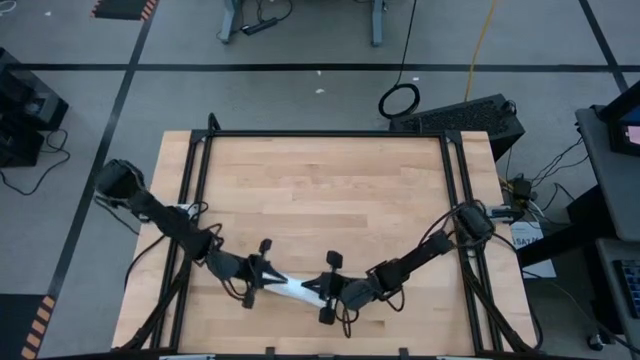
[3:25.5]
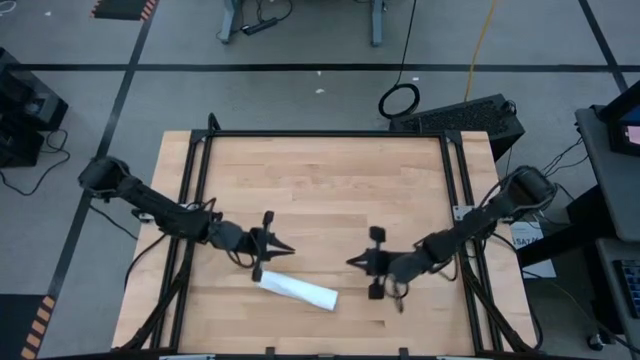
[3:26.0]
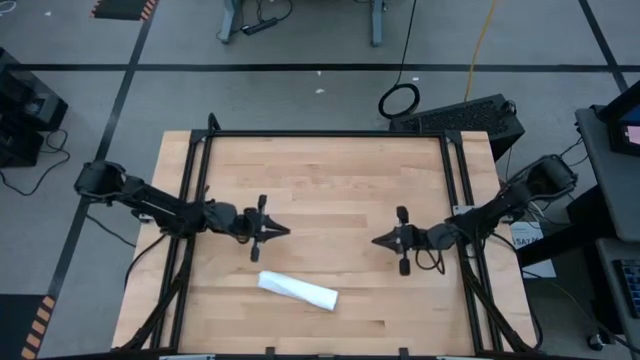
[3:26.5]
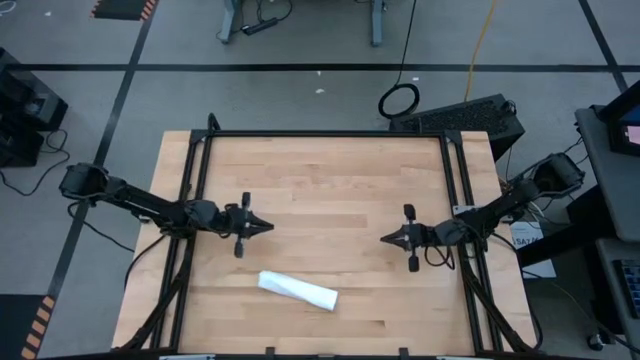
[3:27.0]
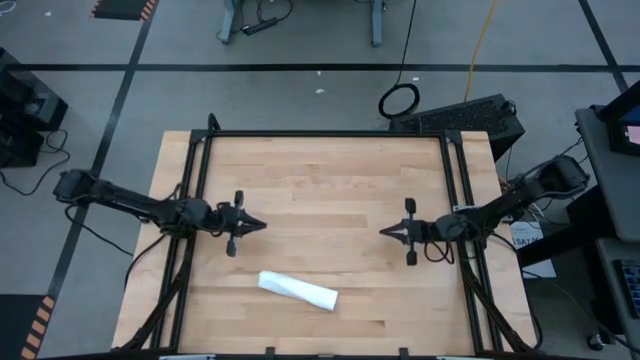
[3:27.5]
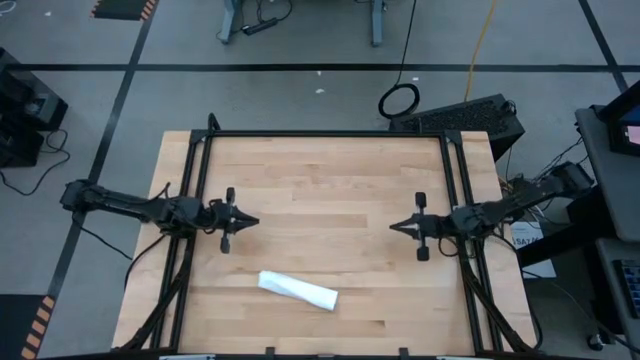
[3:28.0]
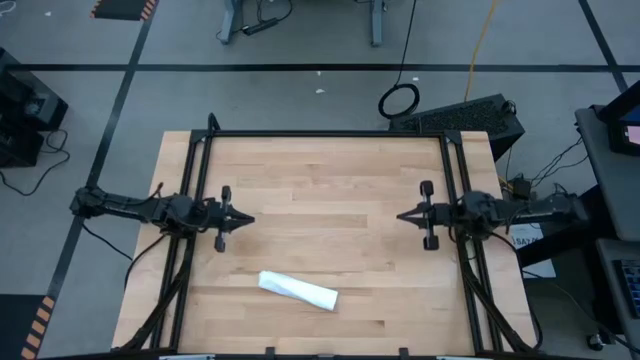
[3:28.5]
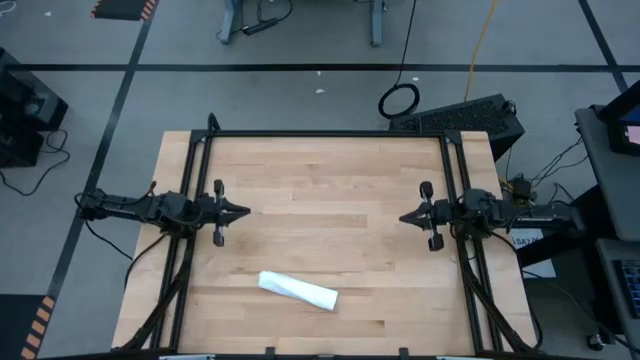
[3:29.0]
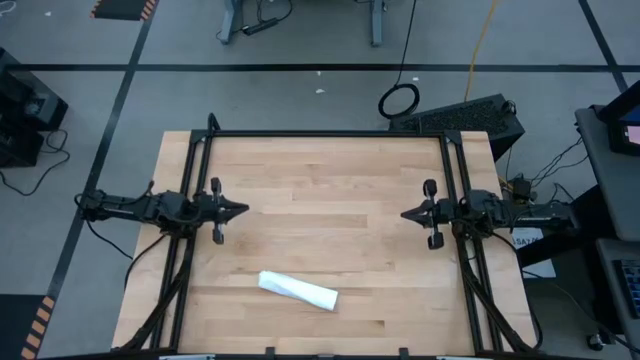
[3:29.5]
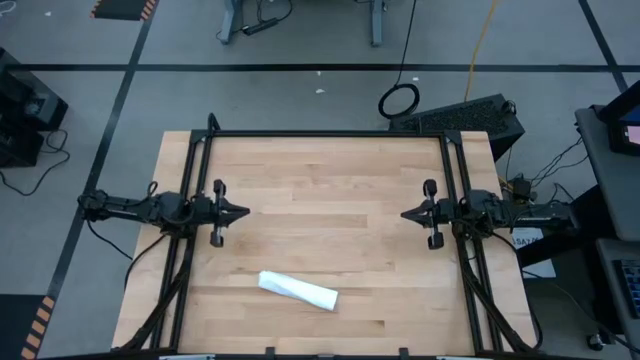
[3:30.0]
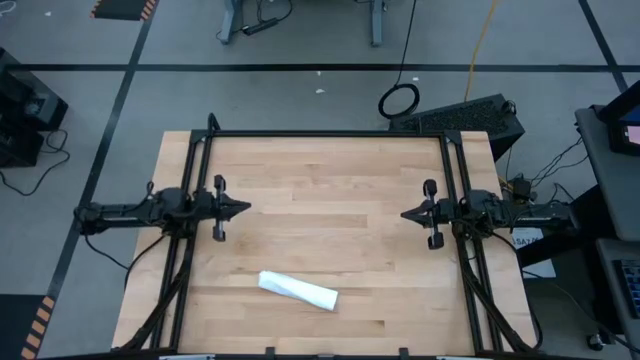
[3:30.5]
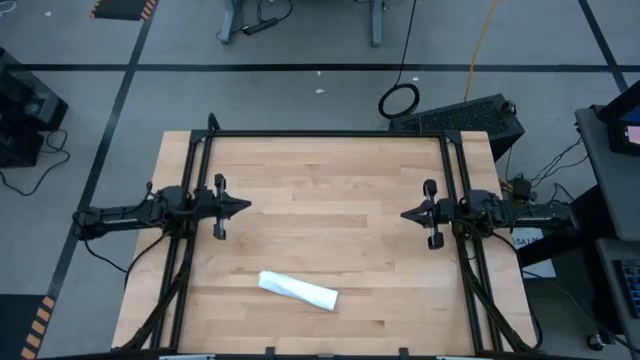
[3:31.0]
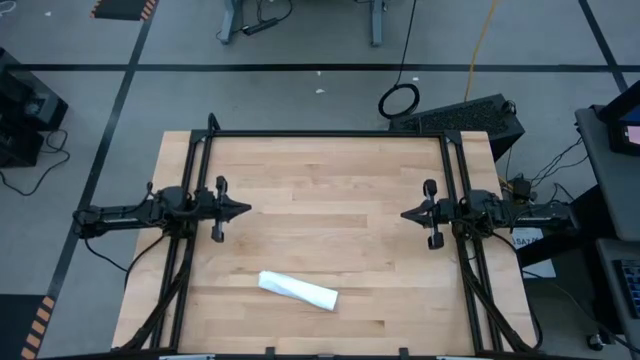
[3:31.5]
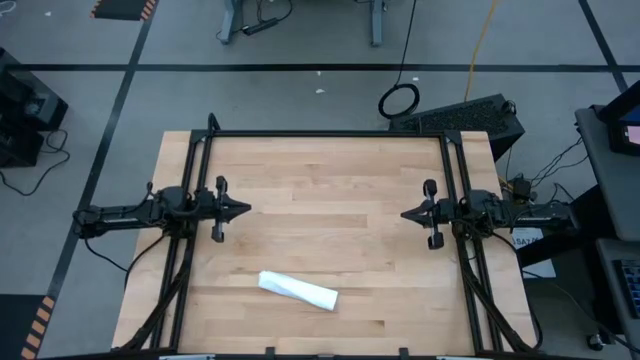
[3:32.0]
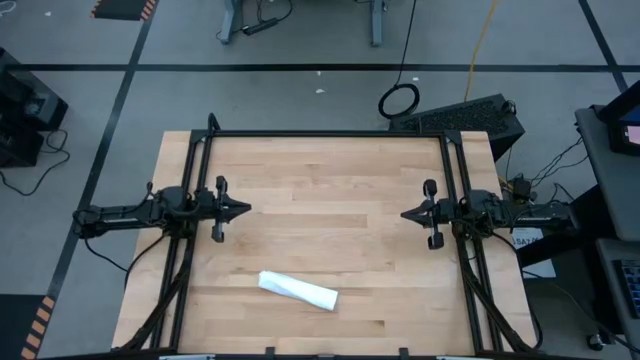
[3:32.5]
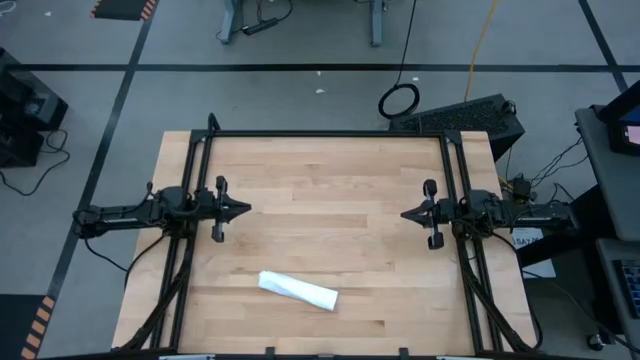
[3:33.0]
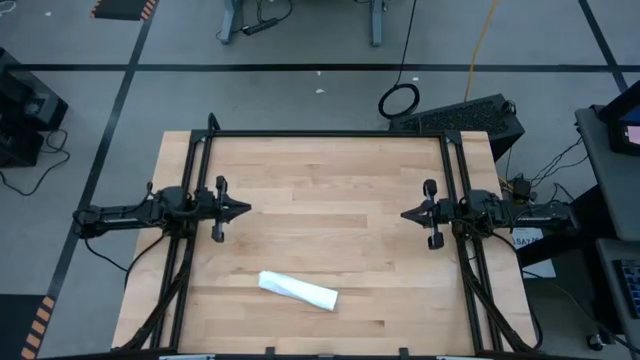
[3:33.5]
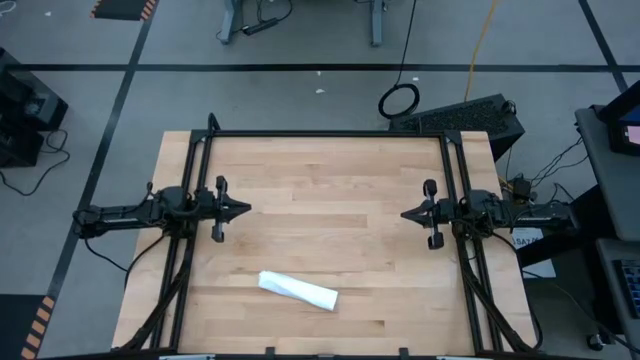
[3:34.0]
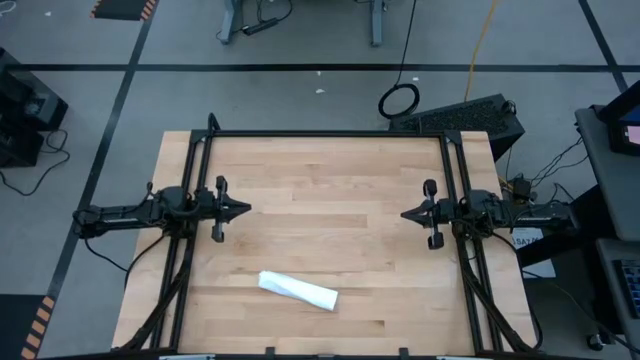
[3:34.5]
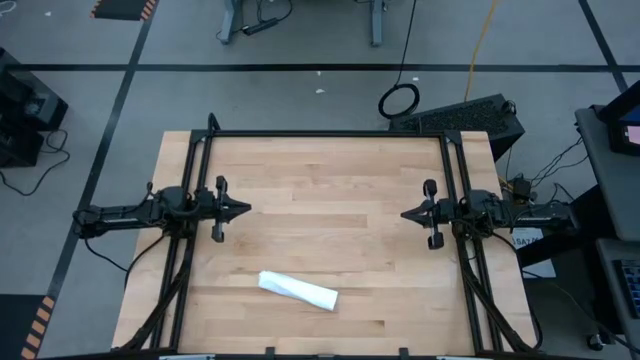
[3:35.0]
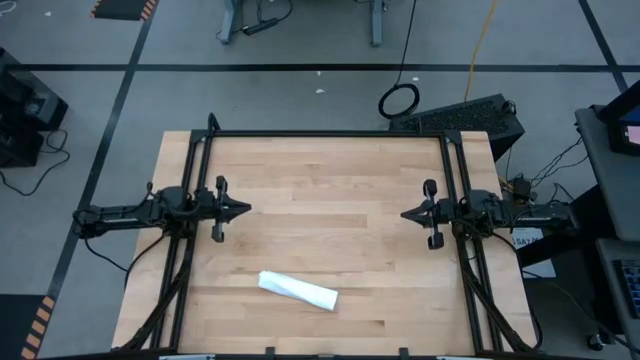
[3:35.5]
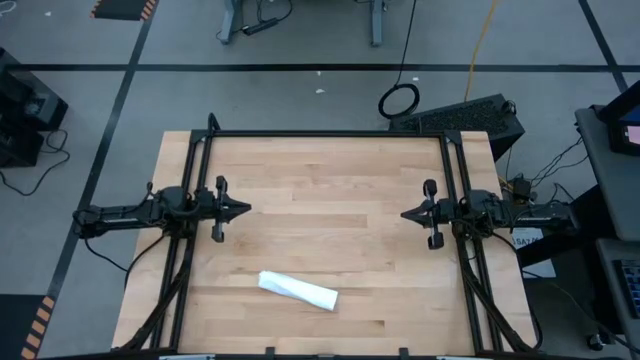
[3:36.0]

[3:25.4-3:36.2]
Task: Roll towel
Return to Home Position

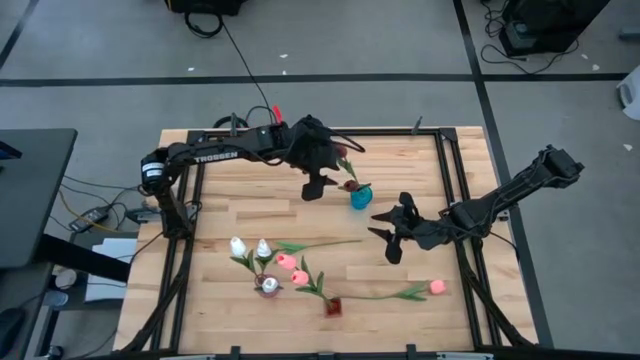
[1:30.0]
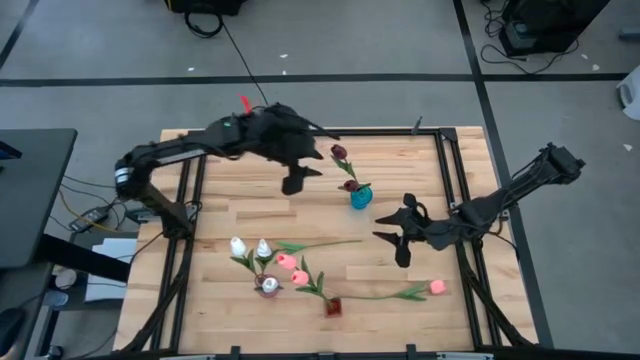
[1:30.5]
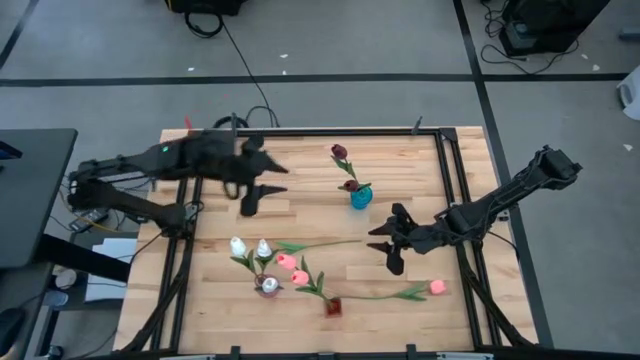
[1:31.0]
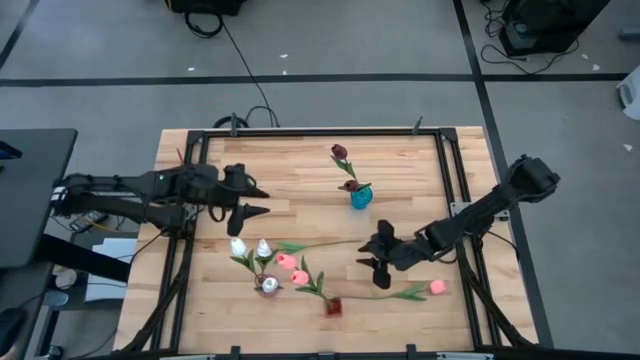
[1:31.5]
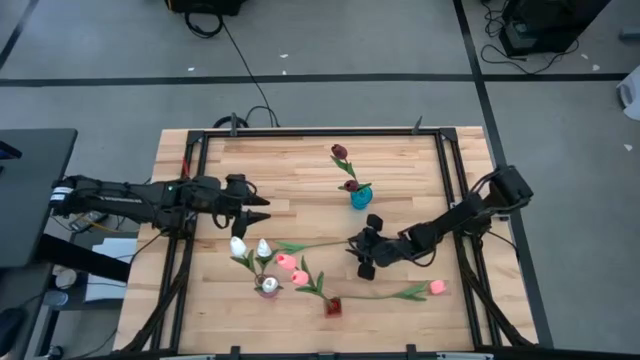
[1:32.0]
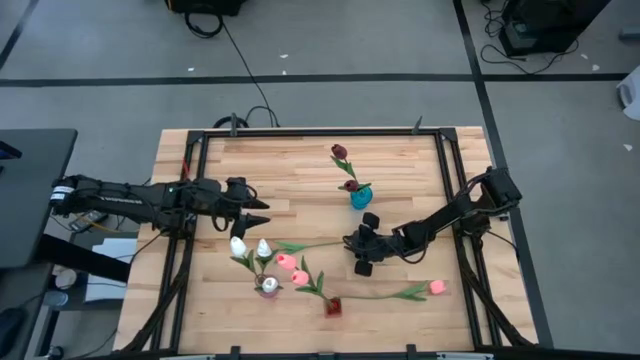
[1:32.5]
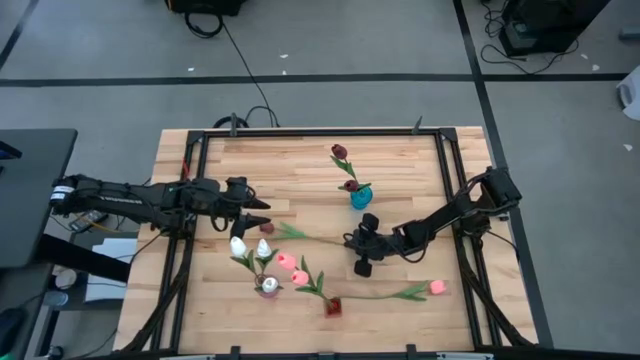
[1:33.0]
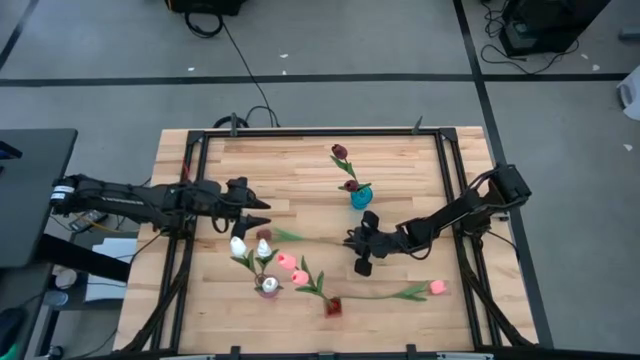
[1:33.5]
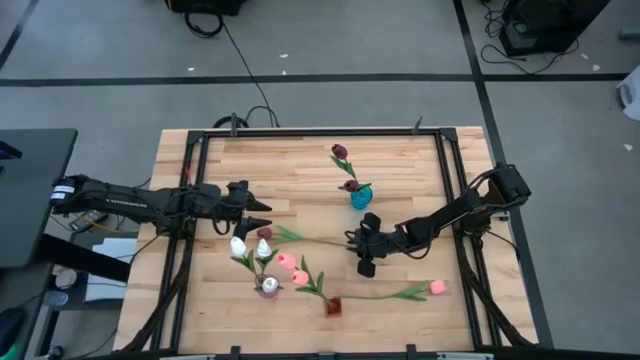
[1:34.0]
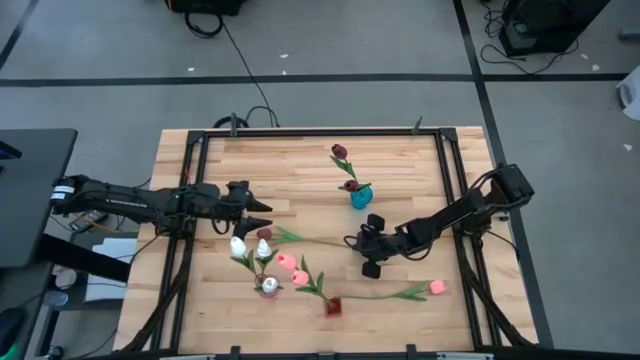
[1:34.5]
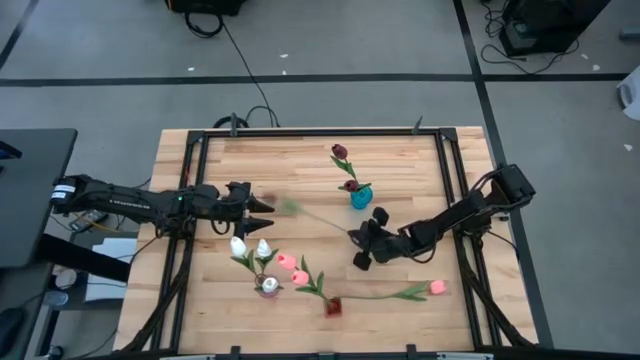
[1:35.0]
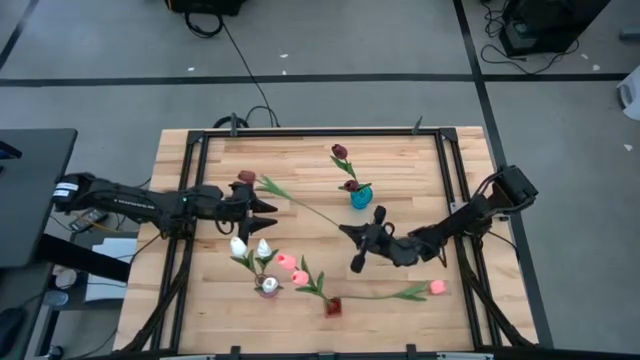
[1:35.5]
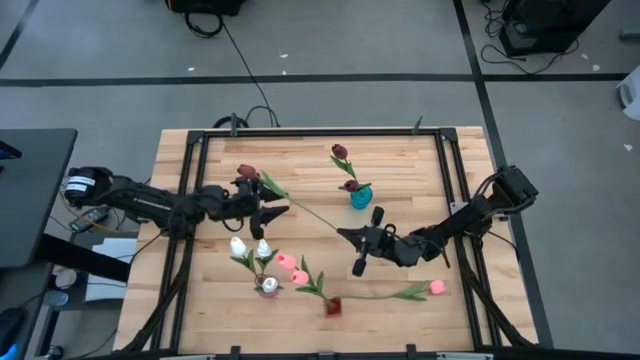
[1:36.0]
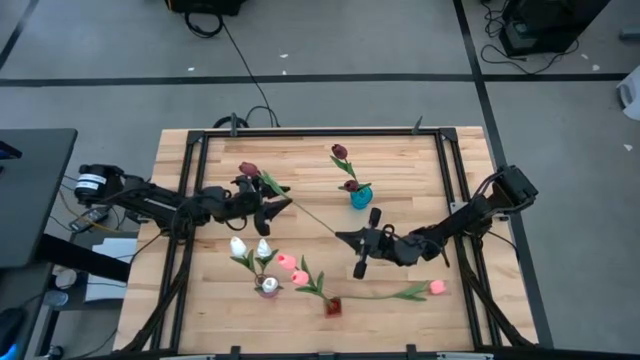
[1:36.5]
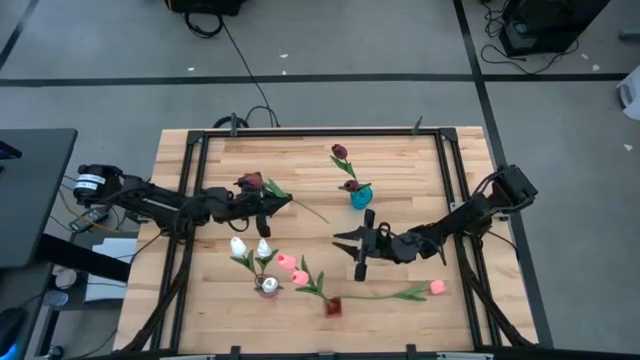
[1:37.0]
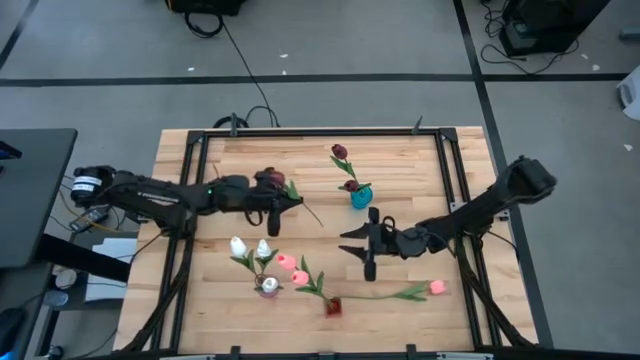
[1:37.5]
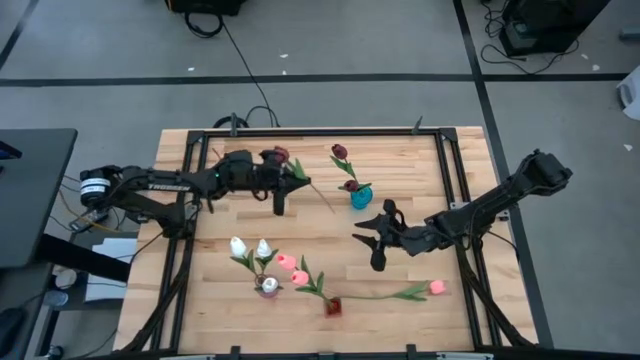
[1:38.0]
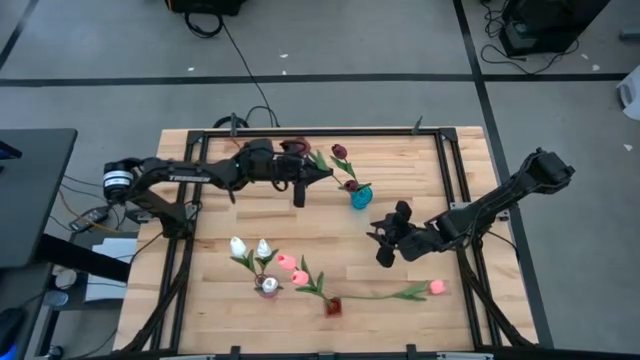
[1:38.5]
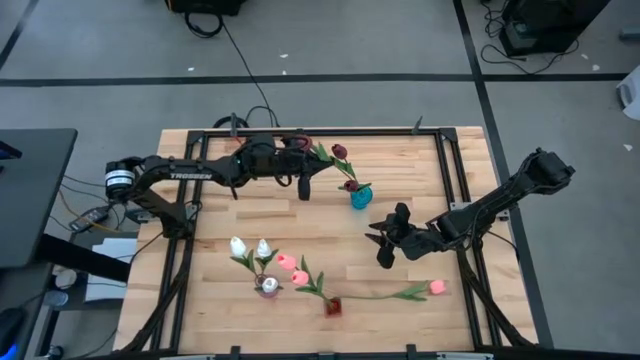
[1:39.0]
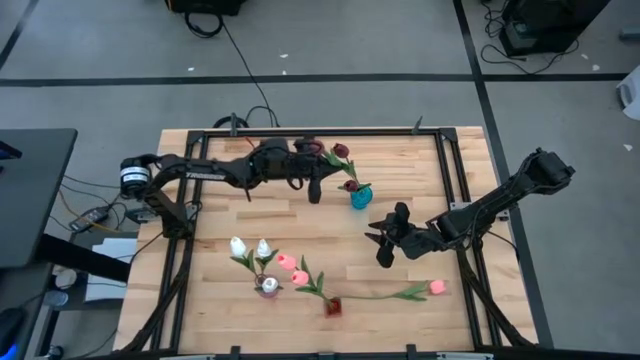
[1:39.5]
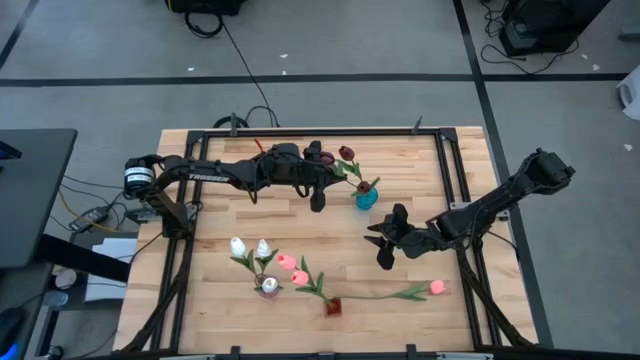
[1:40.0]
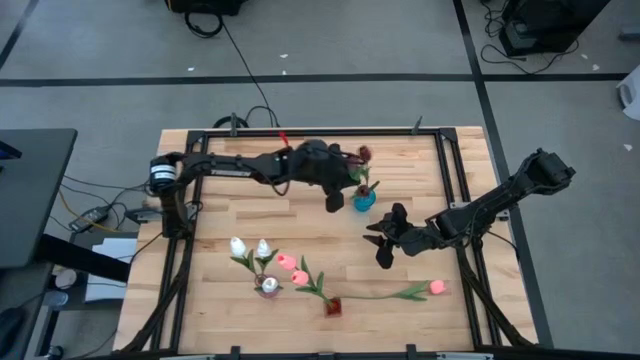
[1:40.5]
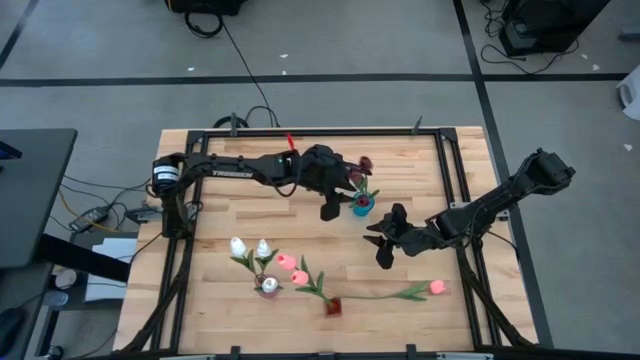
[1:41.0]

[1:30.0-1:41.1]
Task: Sort flowers into vase by color
Put the red flower into the blue vase
